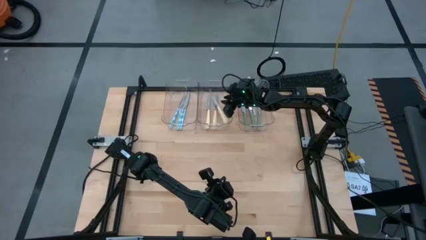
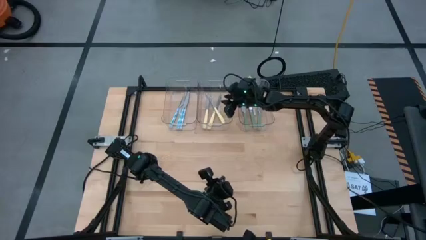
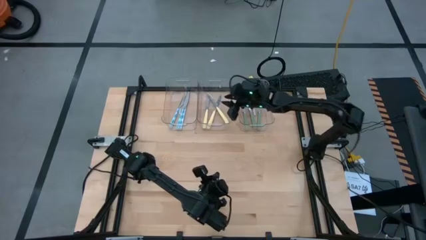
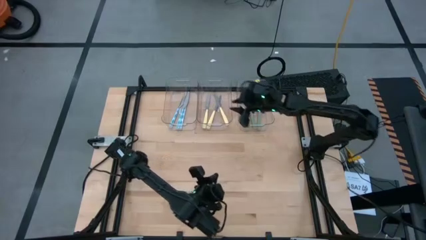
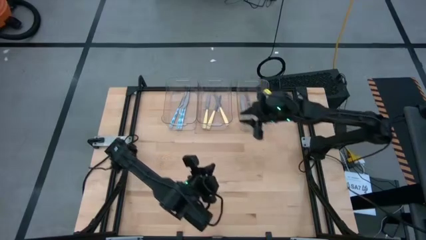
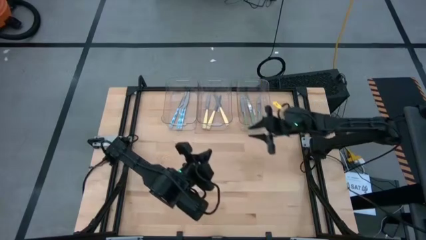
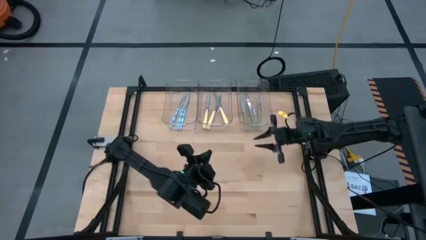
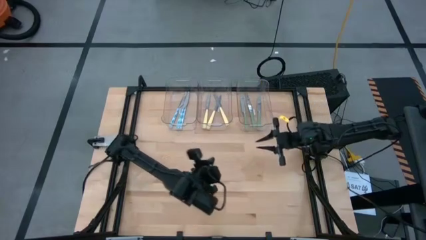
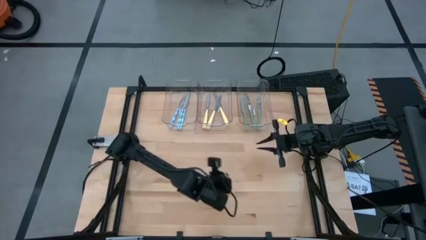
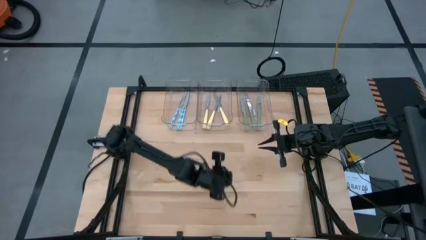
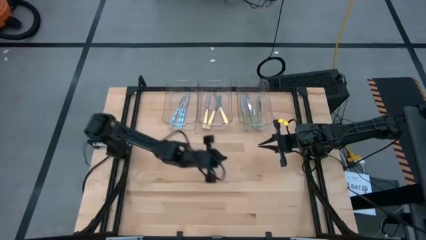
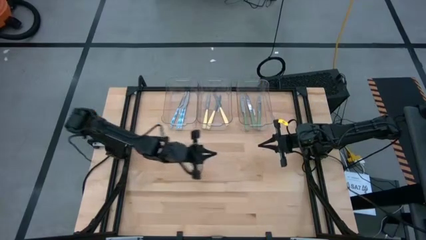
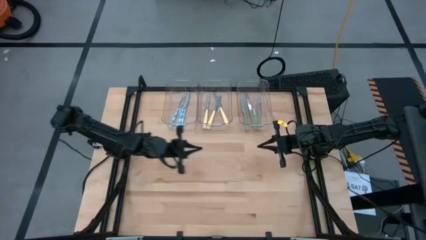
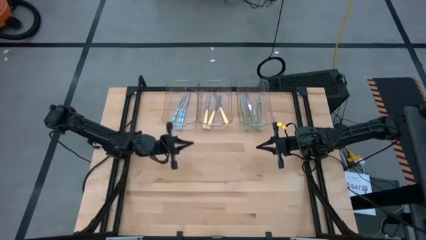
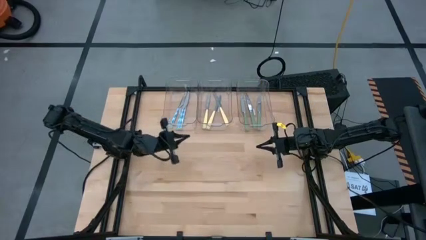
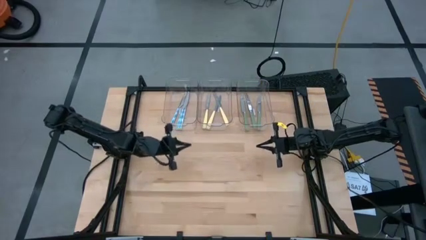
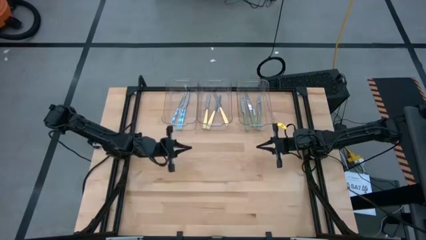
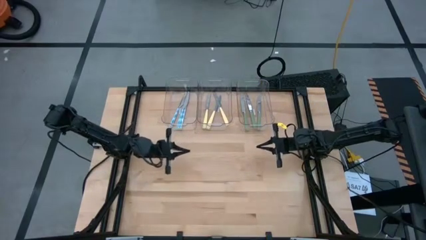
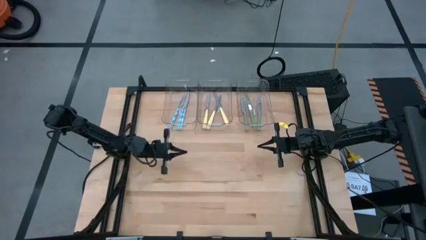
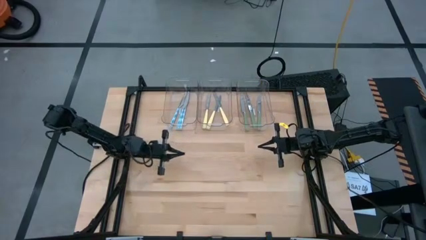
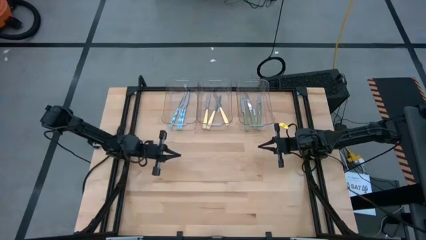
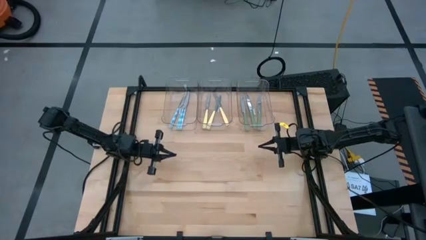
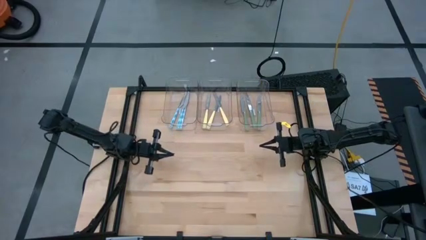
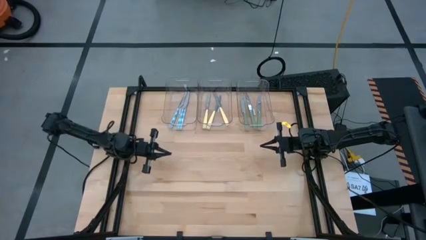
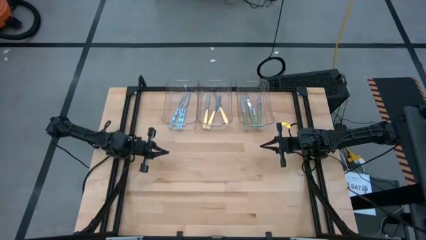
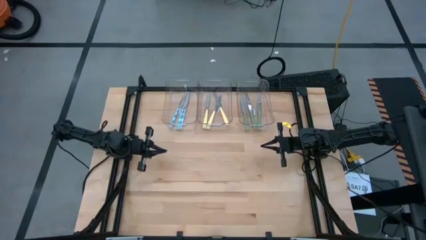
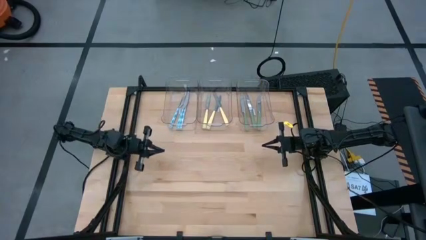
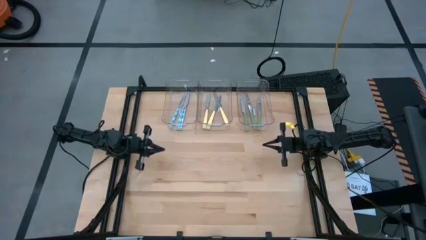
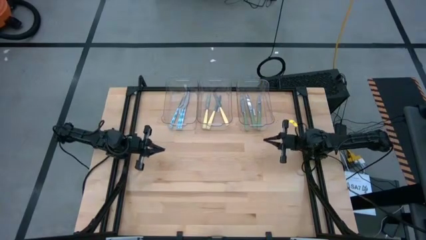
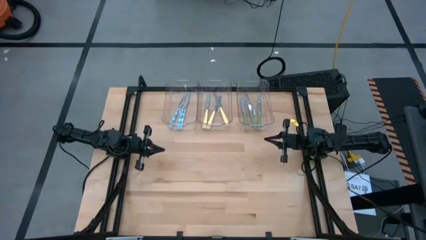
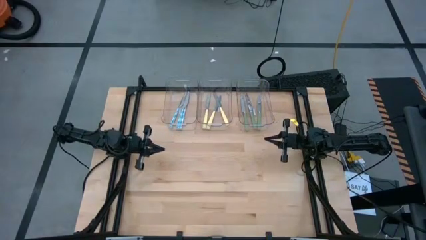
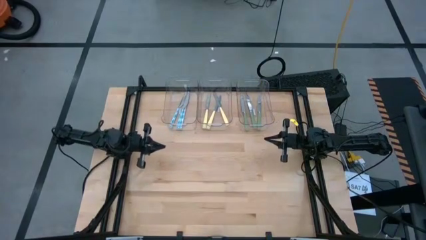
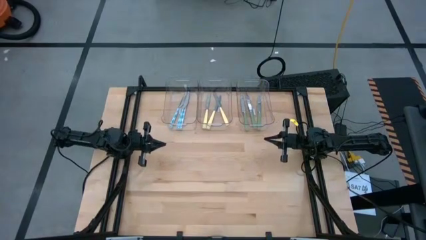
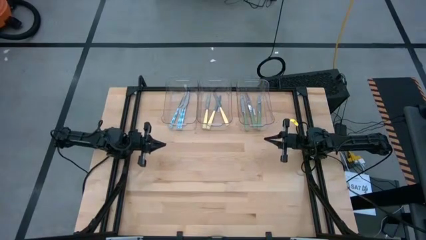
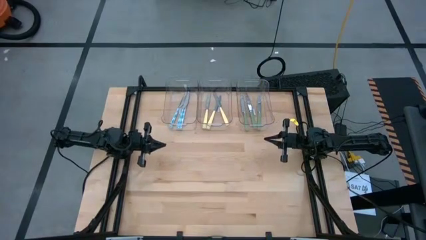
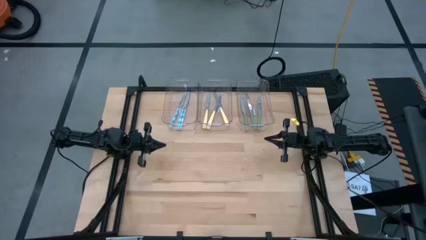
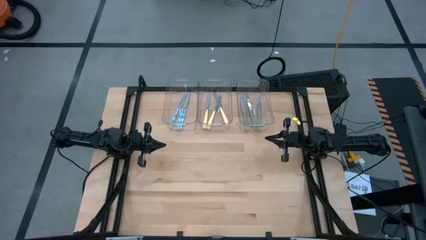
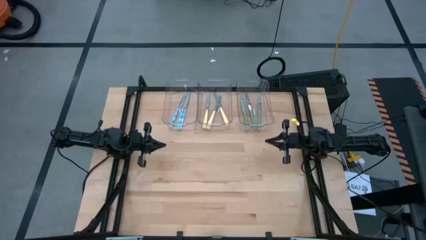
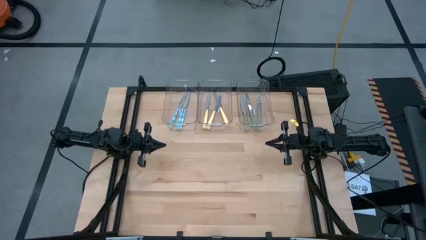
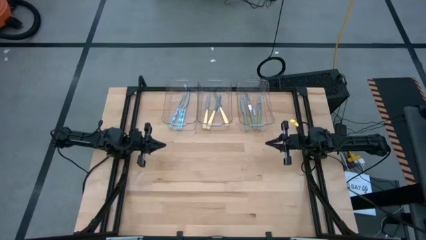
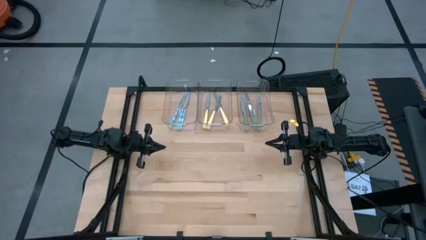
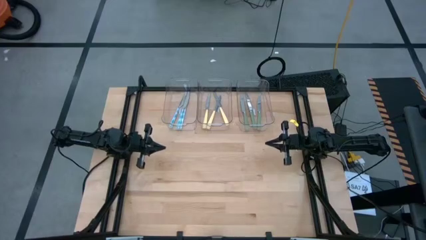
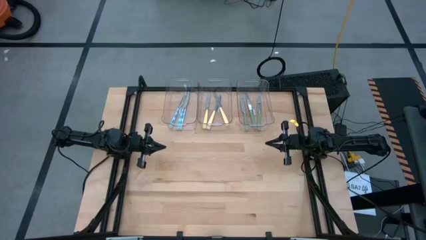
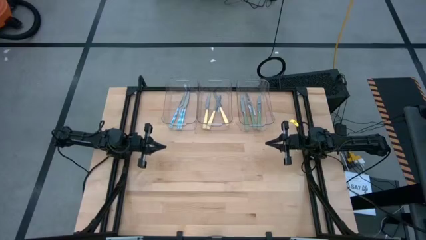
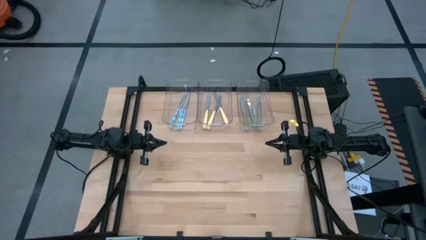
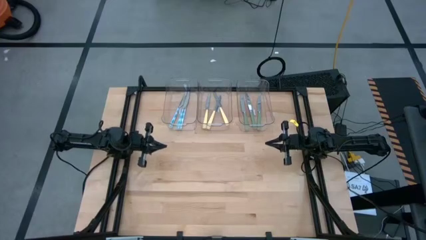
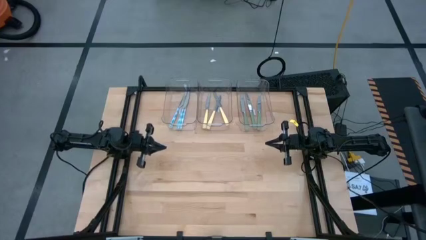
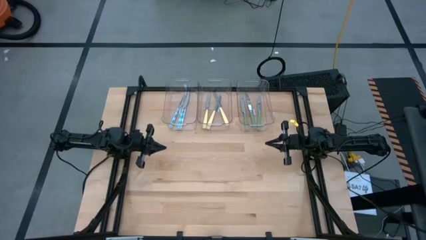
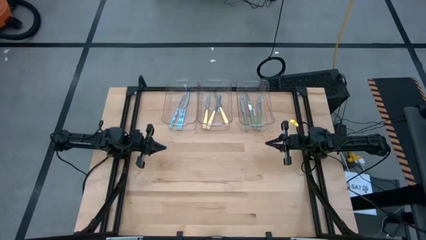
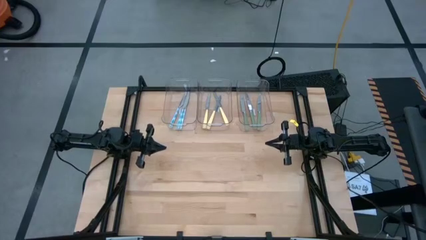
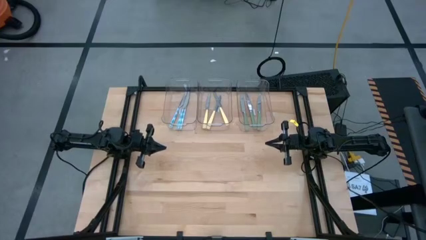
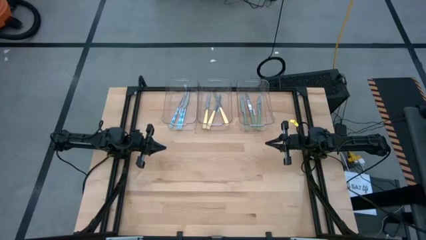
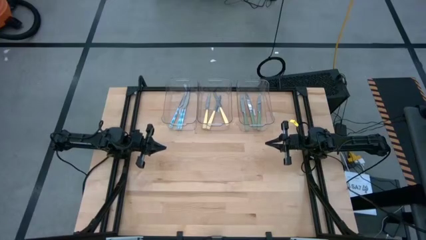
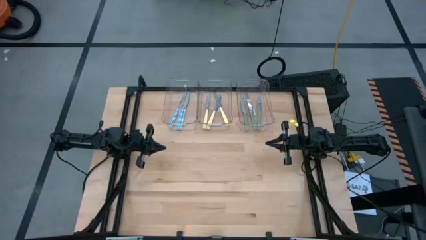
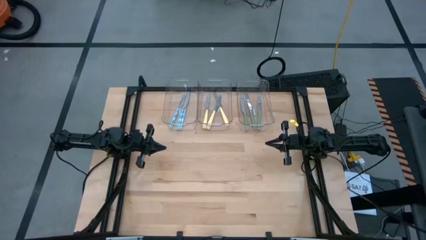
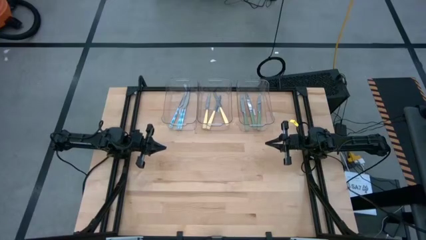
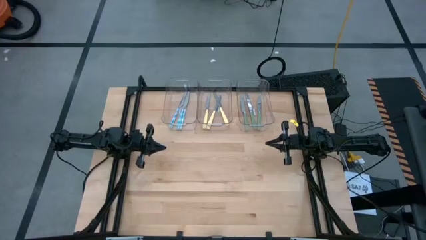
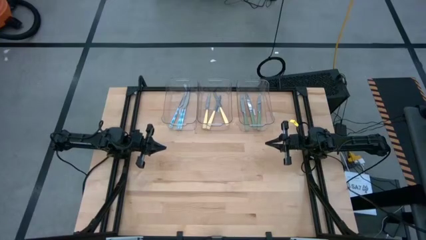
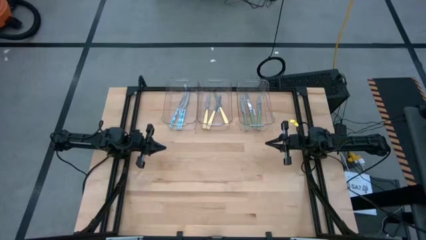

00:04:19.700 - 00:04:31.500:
Task: Sort silverware by color (type)
Return to Home Position

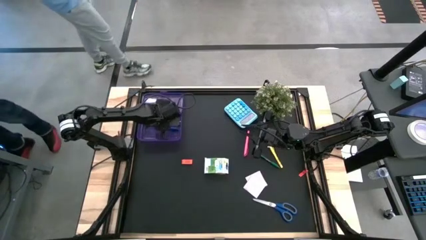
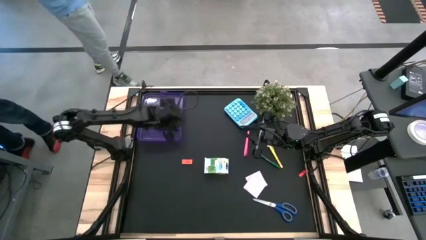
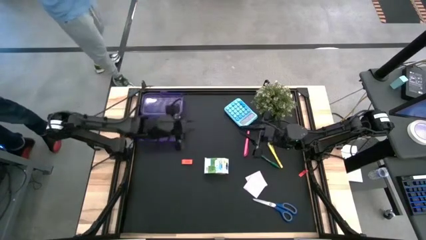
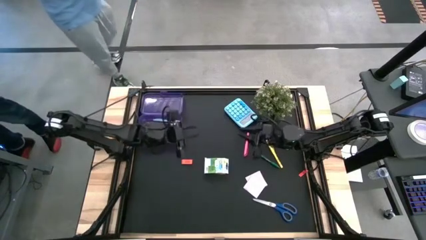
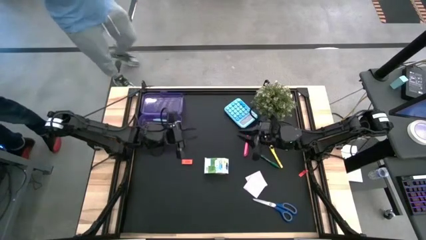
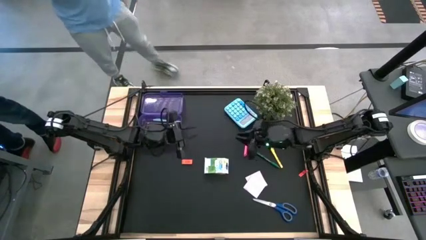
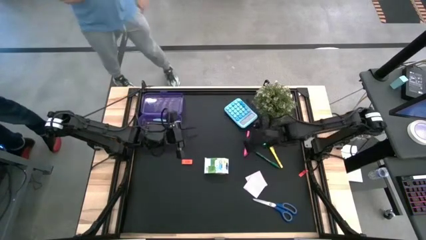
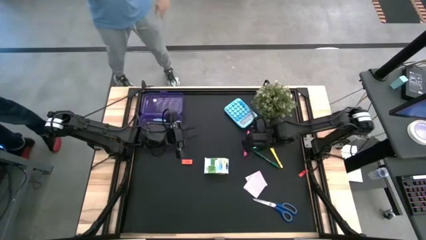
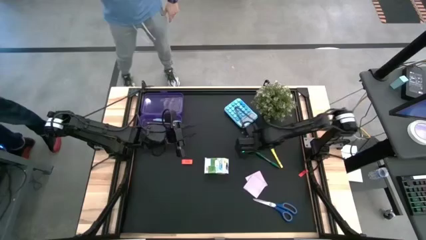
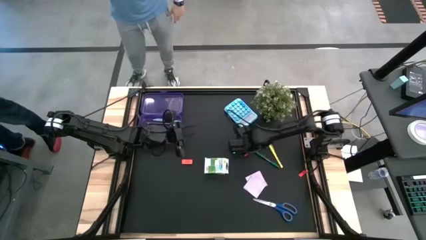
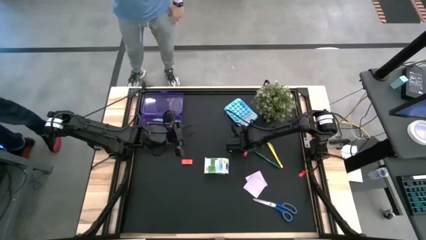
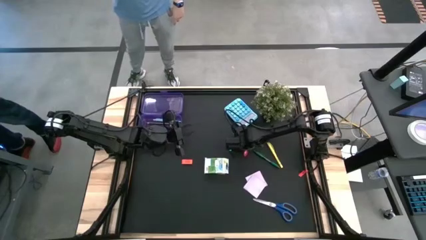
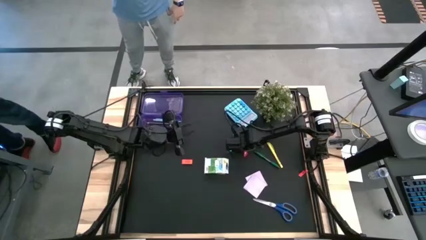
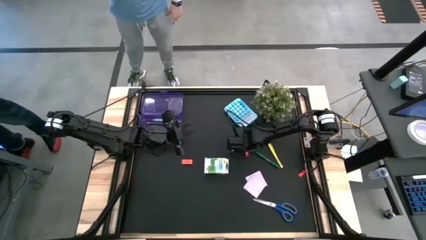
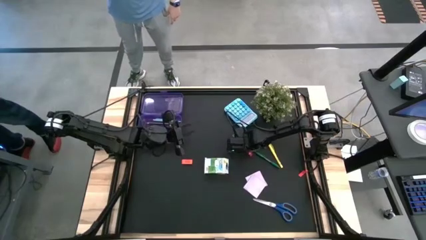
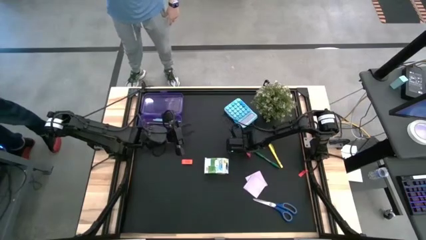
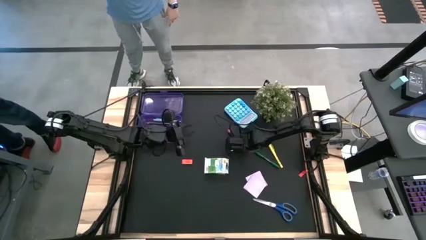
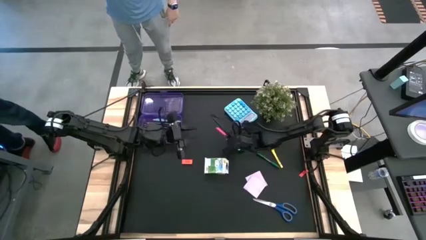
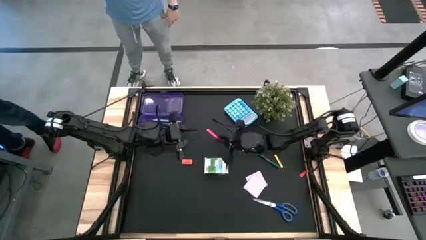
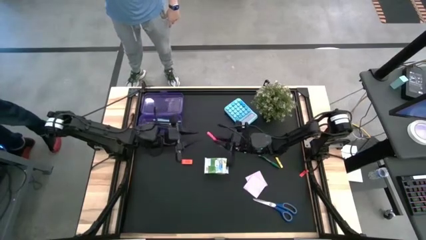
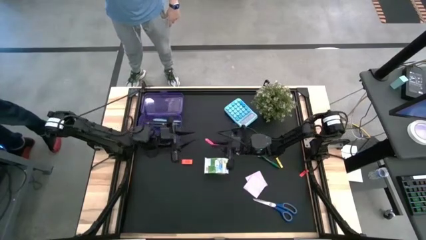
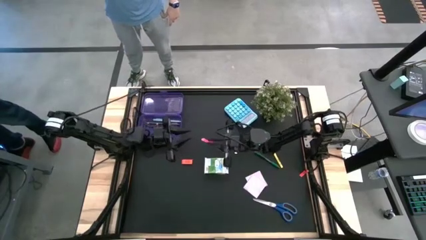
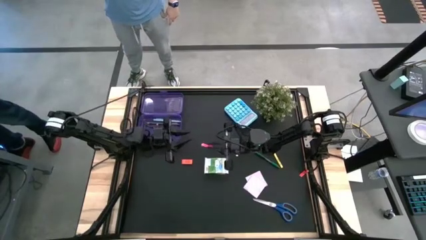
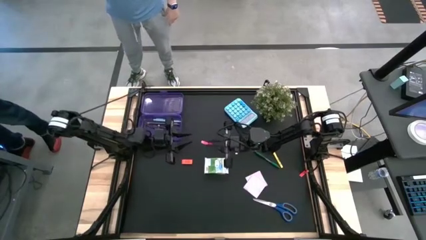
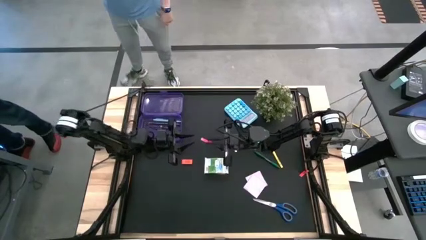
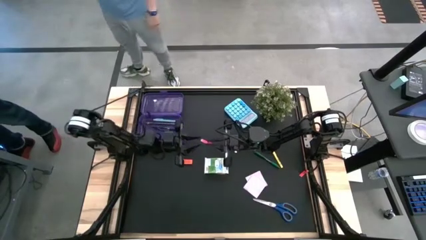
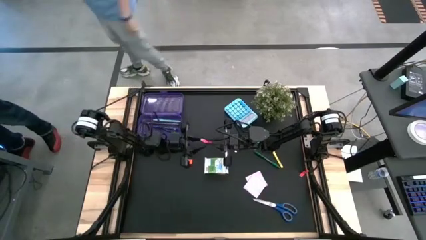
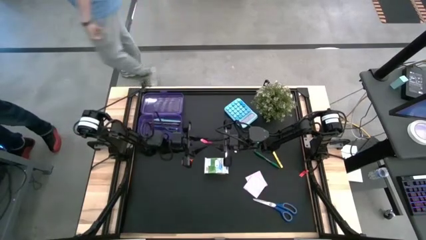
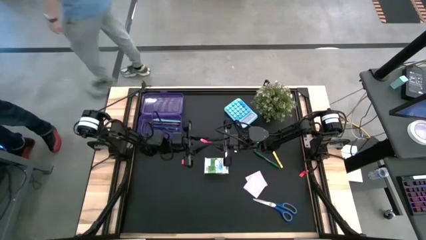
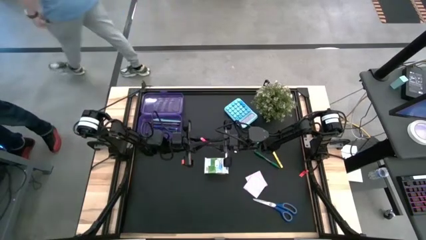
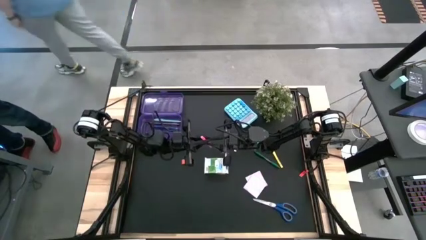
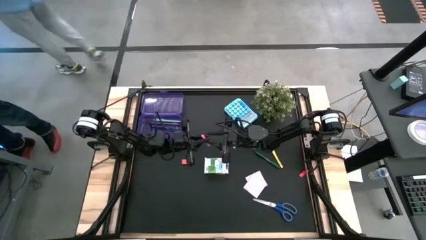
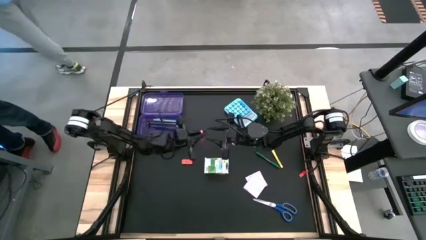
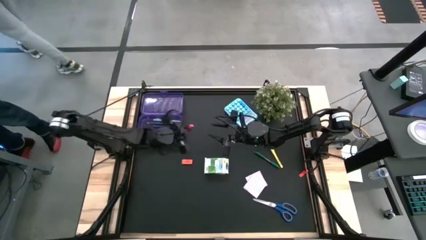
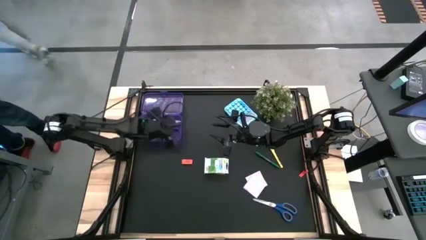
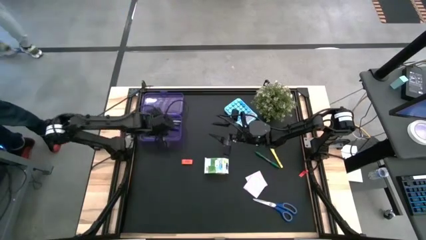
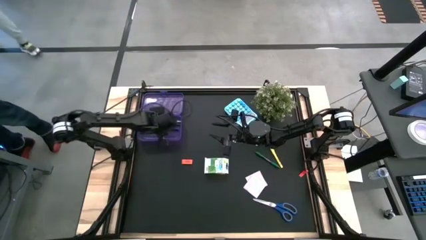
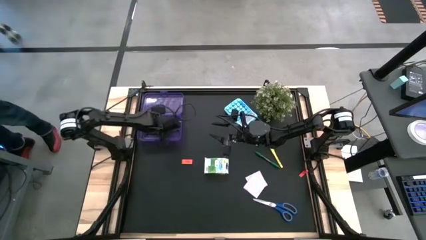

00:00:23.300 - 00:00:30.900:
Task: Pack school essentials
Put the pink pen into the purple supply box
